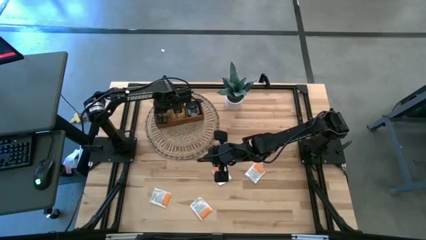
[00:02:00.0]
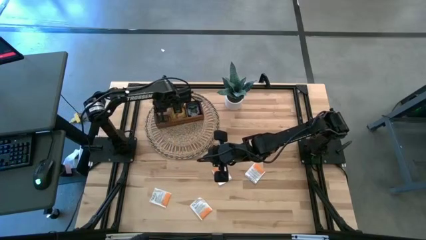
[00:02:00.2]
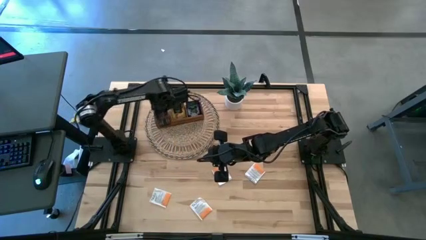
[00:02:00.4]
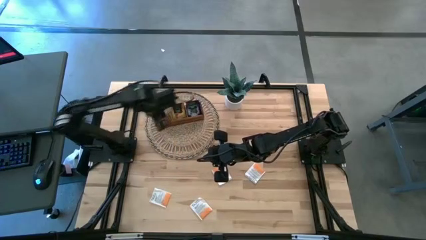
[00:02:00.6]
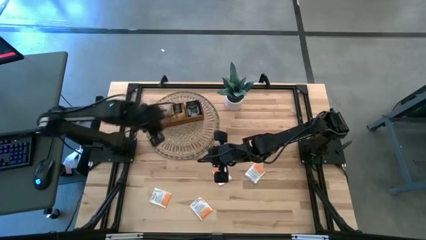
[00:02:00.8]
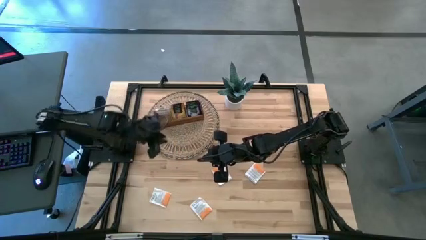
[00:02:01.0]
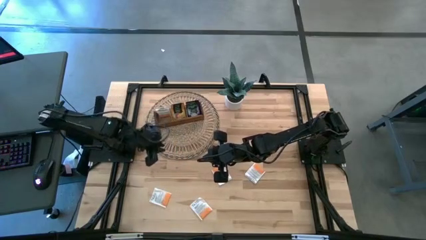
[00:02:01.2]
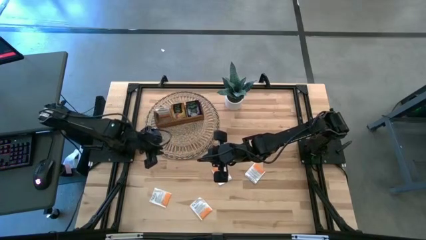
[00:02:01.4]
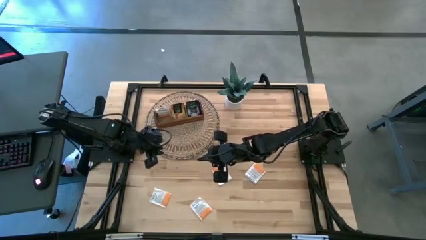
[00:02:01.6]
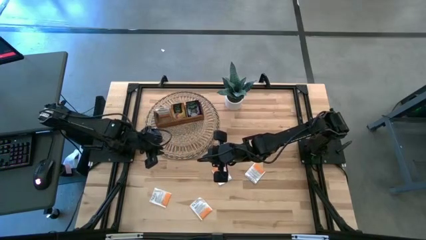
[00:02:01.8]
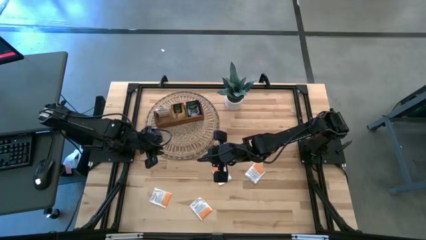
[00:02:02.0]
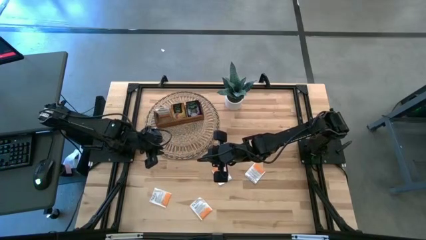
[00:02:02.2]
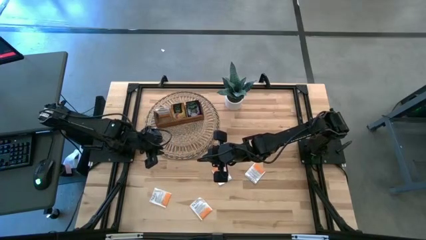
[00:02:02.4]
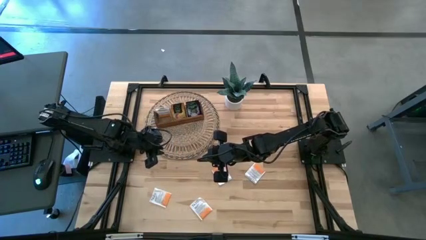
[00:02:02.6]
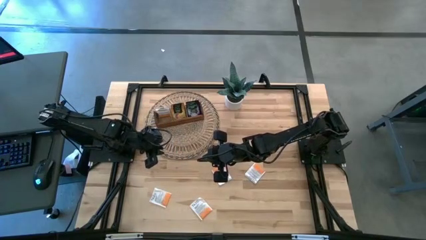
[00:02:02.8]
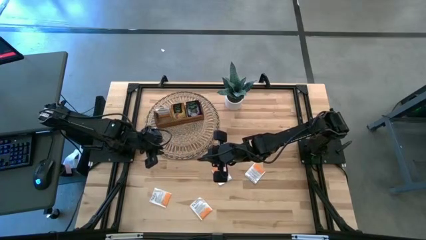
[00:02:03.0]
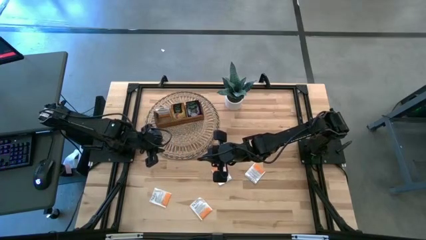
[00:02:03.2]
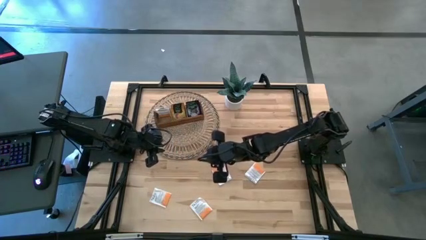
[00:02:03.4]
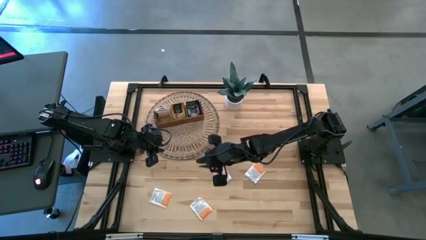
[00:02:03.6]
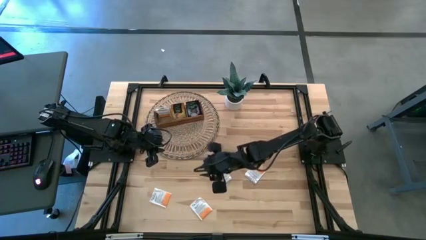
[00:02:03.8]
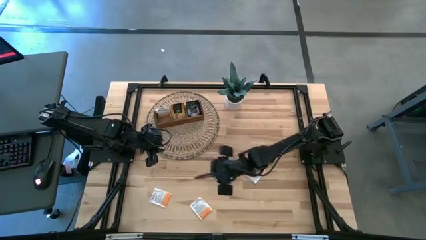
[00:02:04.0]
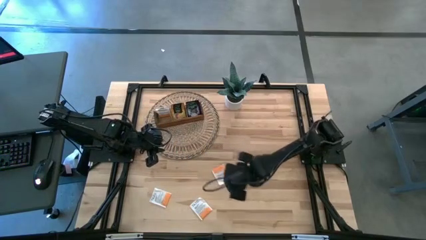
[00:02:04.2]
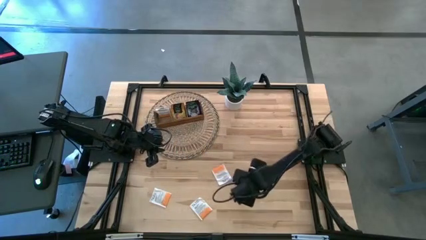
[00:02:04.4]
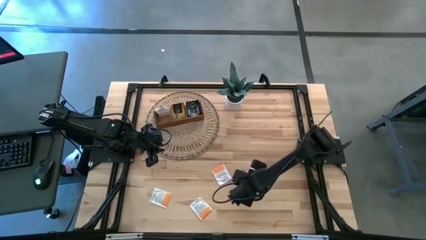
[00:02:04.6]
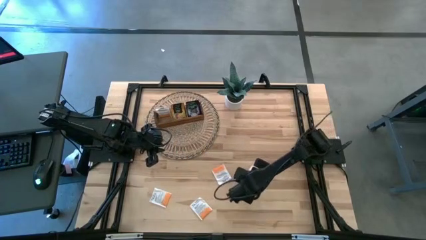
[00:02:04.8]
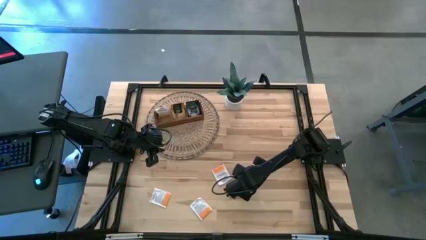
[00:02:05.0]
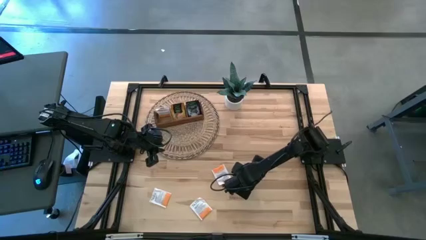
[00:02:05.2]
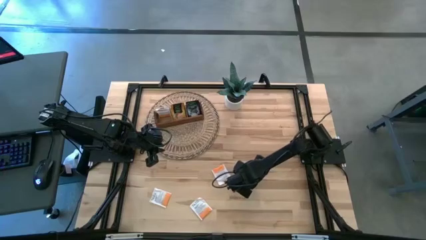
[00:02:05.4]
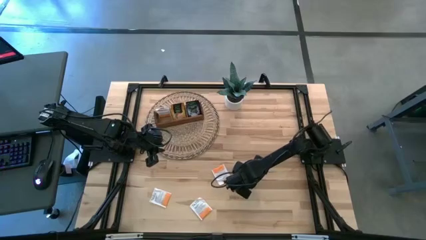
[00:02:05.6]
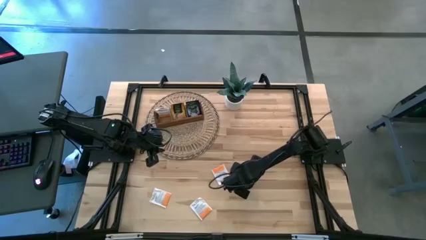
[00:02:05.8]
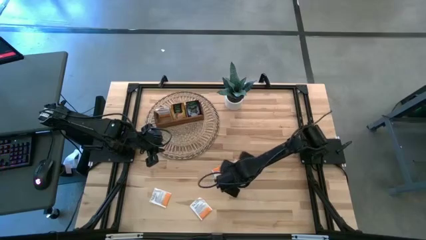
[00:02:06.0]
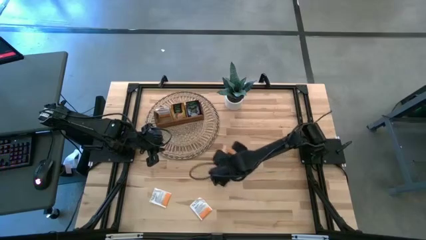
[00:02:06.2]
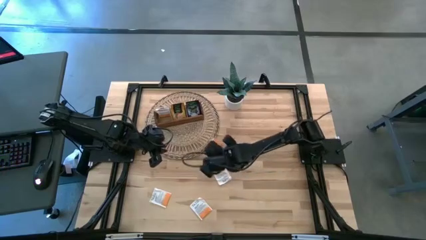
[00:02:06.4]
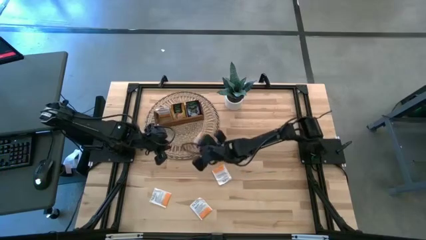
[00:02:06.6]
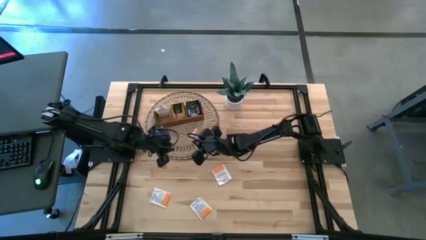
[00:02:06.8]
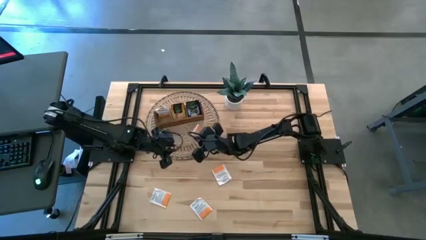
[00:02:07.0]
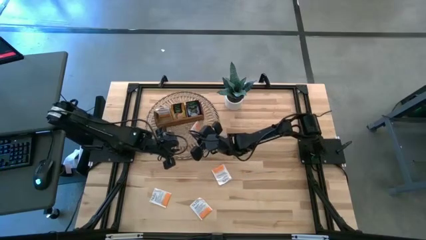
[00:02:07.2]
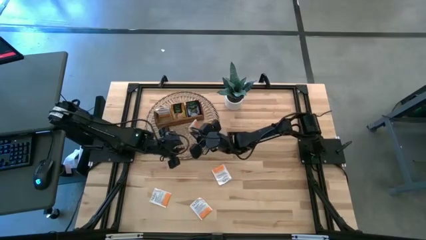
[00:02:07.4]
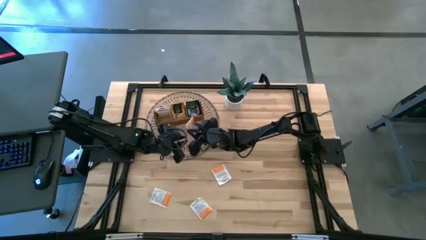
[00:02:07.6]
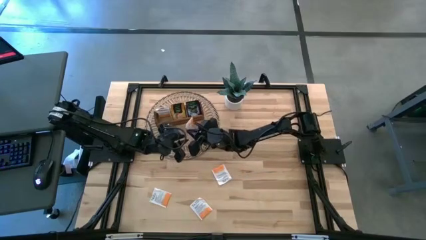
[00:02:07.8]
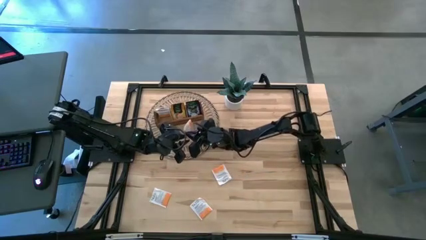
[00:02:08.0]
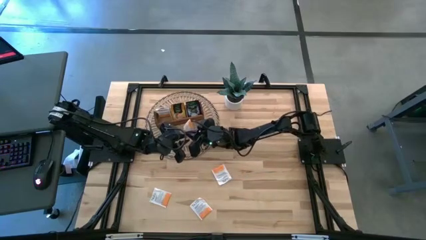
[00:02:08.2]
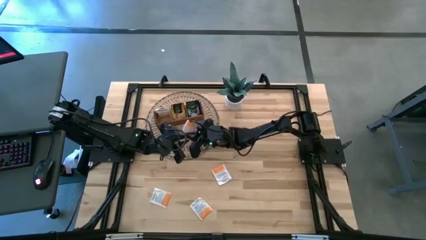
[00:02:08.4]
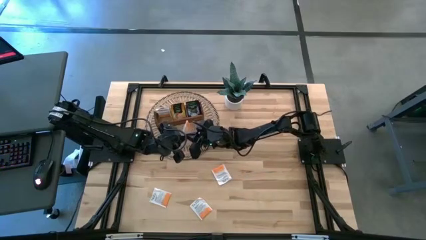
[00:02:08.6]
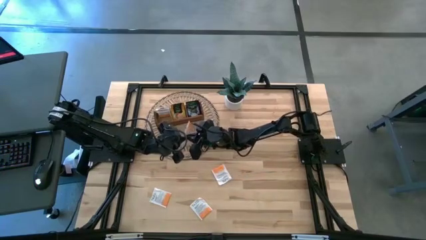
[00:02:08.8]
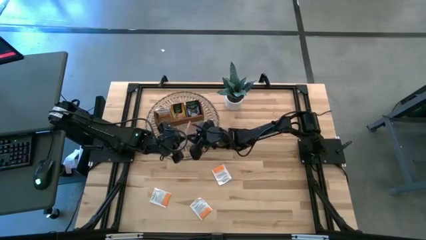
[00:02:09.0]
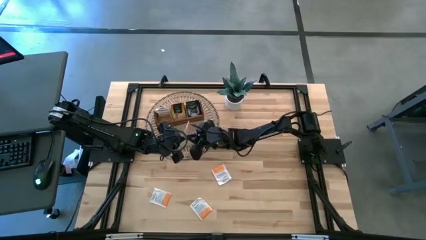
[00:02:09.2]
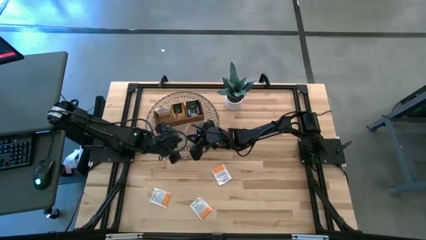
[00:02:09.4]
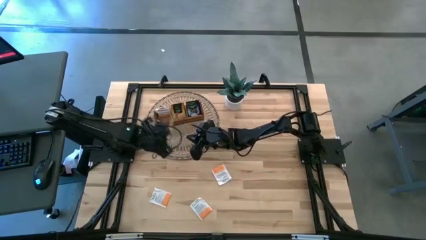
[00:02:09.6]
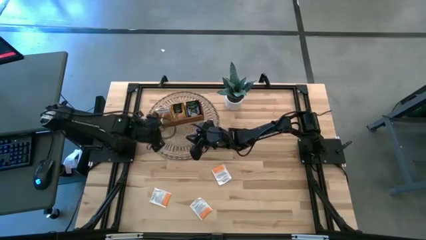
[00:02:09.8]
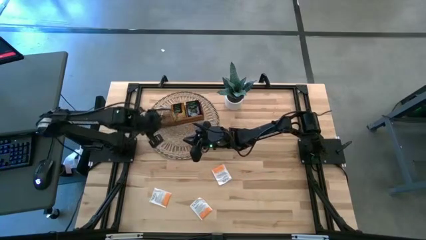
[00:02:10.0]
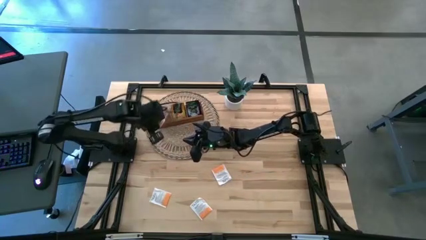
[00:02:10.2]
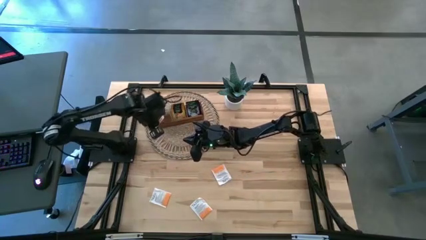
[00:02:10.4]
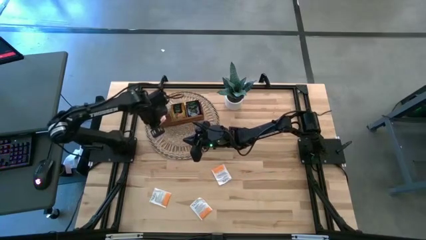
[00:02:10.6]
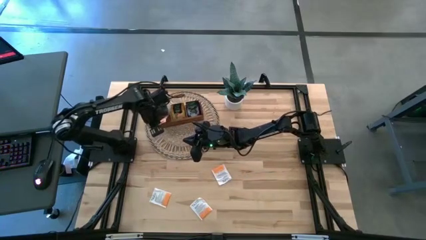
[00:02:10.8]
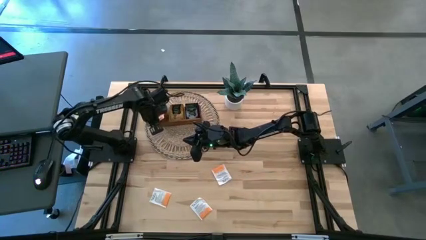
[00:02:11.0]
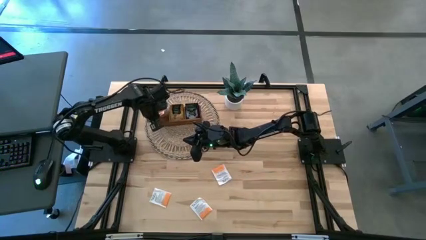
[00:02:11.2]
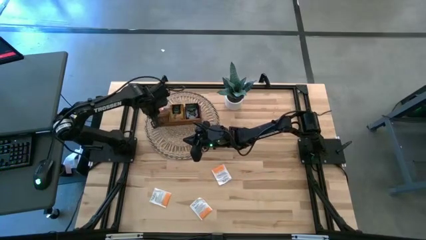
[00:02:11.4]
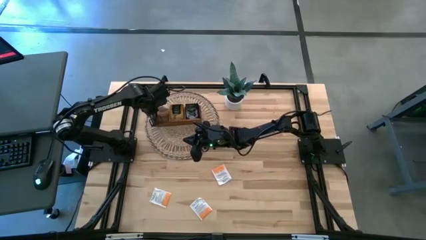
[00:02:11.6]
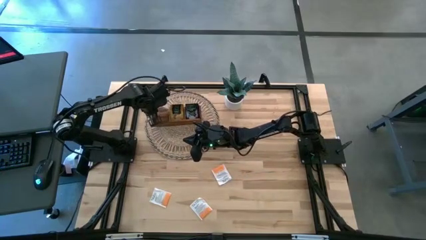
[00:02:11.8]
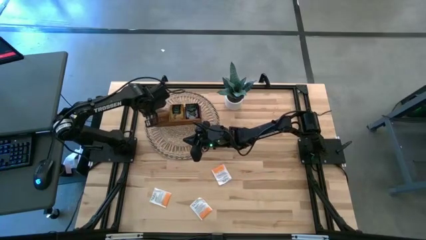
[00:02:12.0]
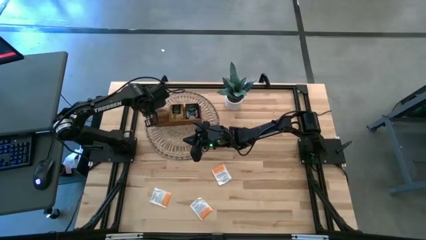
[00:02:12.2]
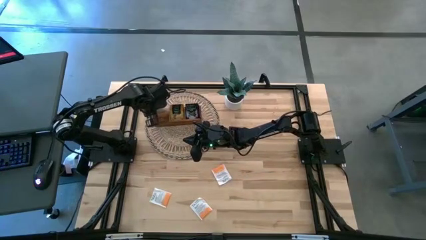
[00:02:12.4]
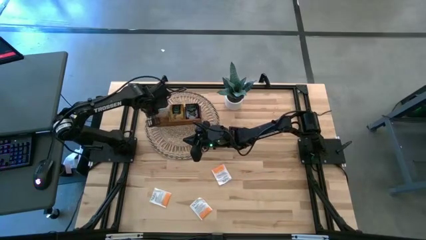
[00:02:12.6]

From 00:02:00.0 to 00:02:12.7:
Task: Pick & Place Tea
Put the white tea bag into the left section of the wooden organizer
